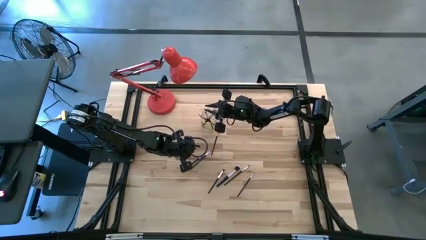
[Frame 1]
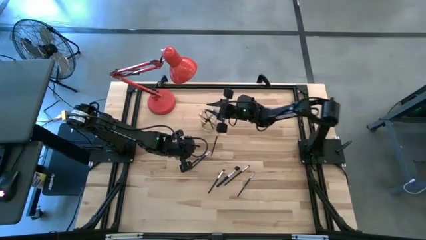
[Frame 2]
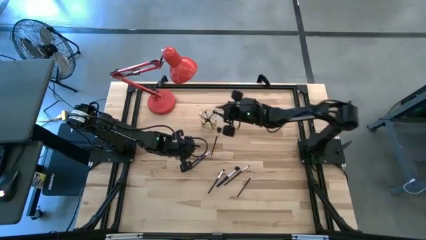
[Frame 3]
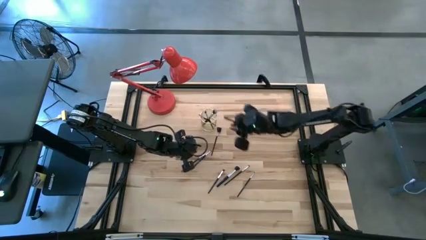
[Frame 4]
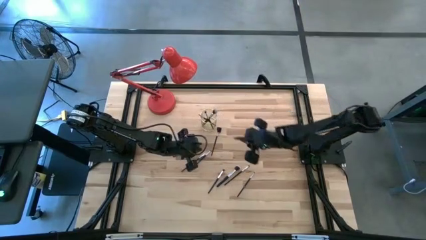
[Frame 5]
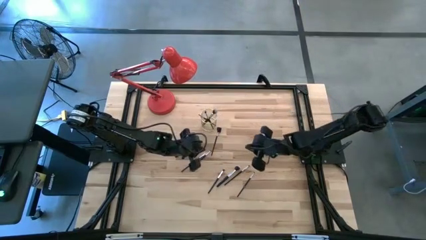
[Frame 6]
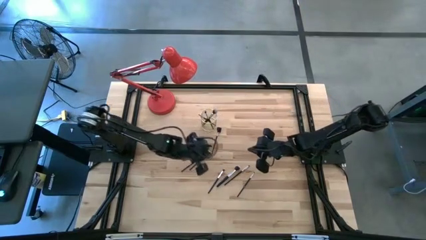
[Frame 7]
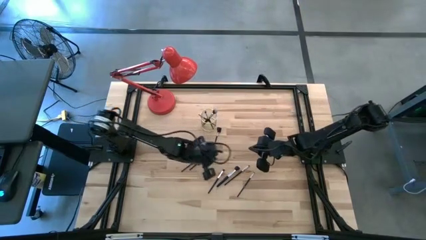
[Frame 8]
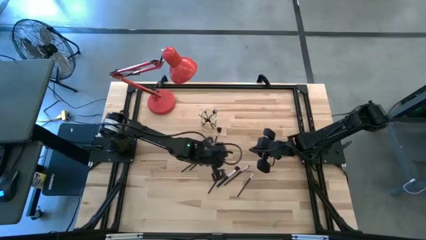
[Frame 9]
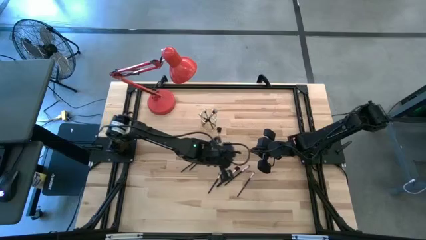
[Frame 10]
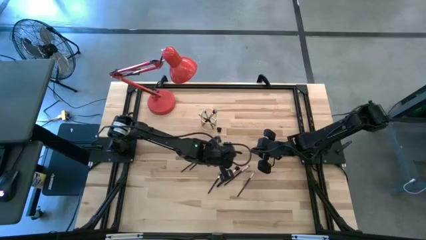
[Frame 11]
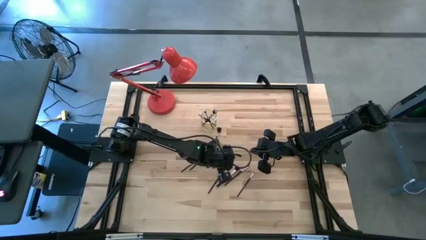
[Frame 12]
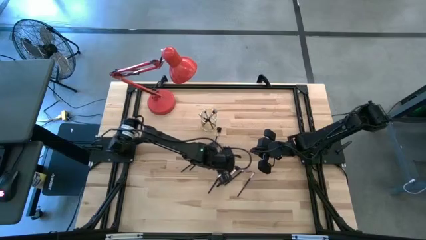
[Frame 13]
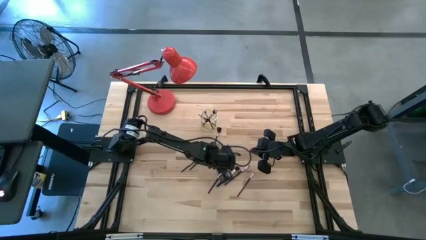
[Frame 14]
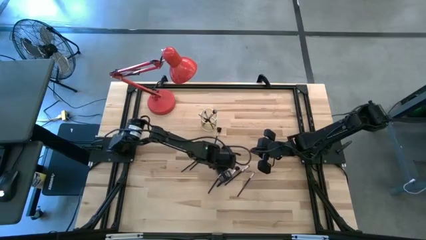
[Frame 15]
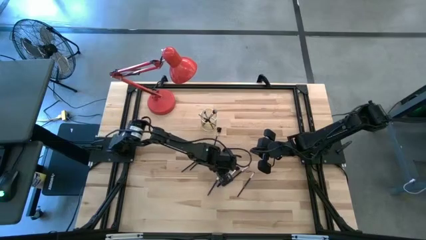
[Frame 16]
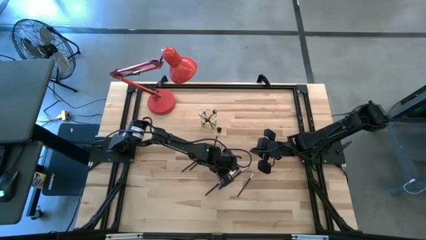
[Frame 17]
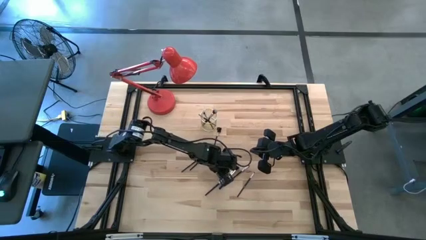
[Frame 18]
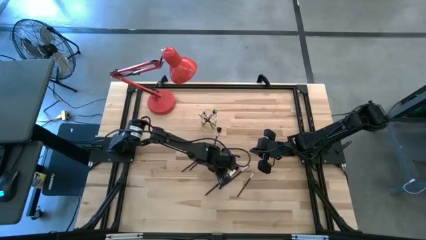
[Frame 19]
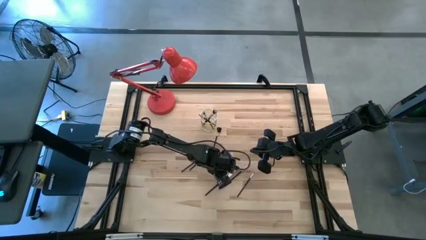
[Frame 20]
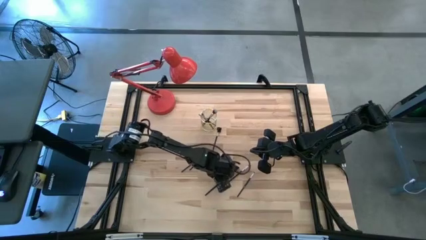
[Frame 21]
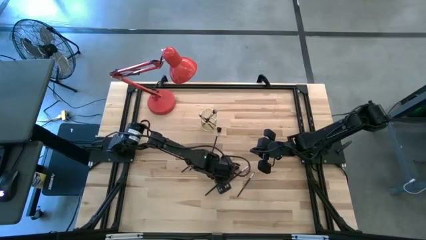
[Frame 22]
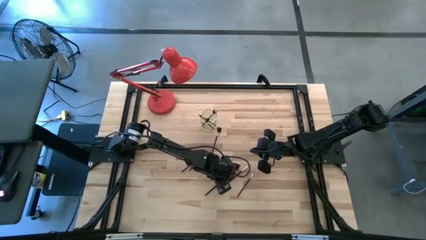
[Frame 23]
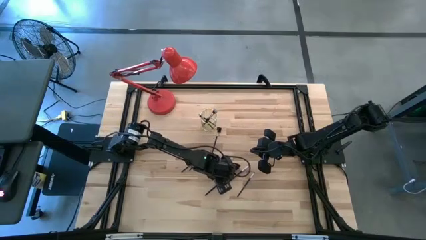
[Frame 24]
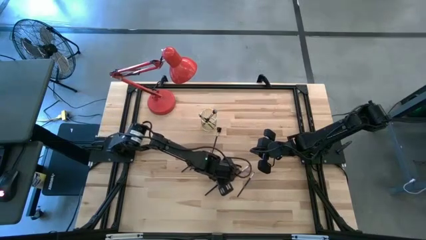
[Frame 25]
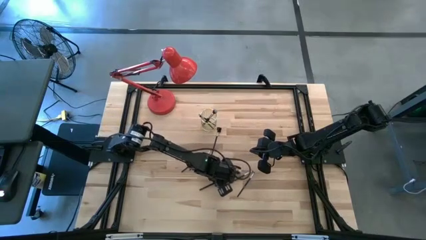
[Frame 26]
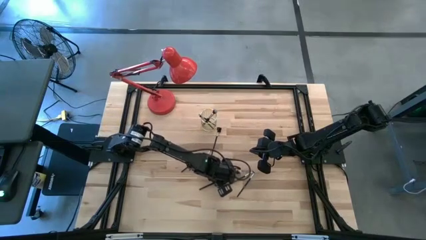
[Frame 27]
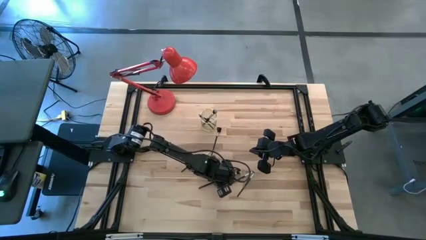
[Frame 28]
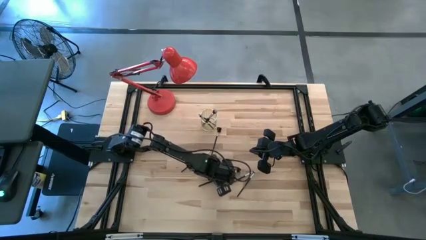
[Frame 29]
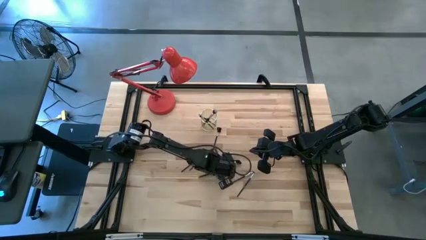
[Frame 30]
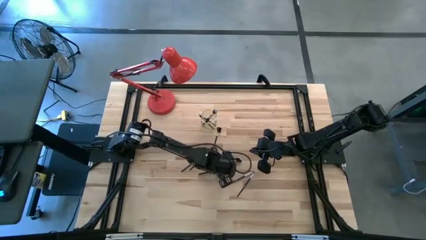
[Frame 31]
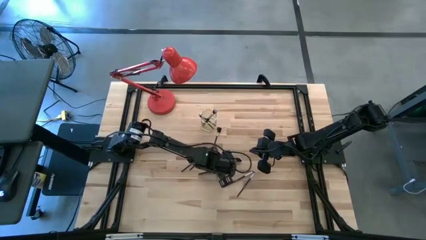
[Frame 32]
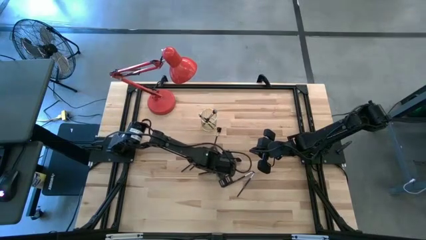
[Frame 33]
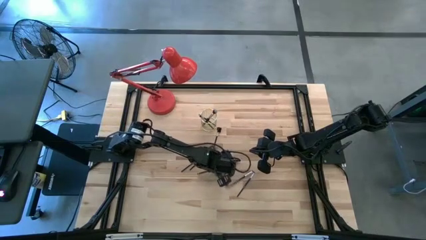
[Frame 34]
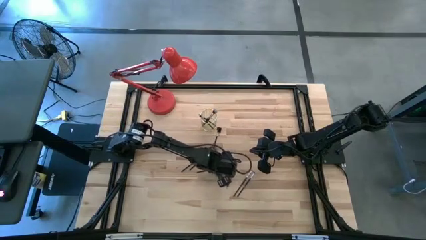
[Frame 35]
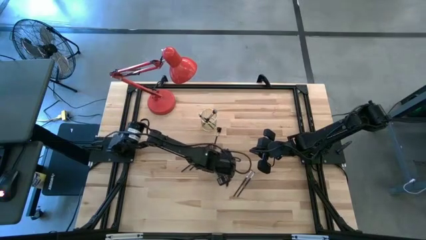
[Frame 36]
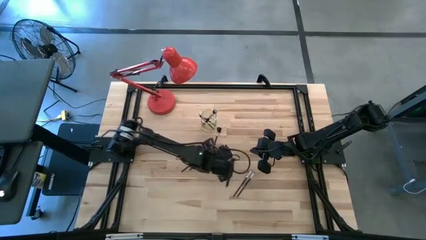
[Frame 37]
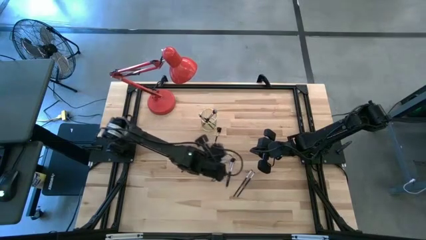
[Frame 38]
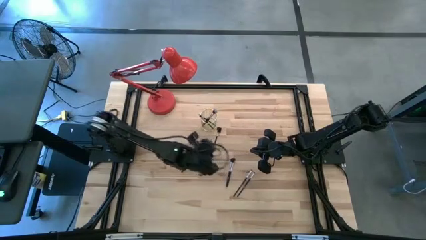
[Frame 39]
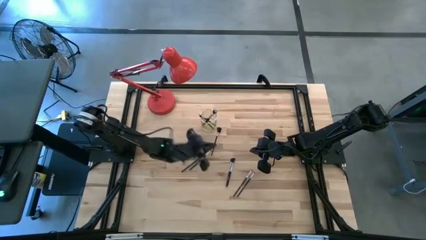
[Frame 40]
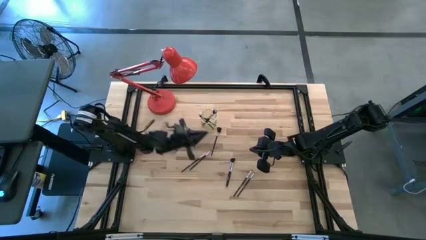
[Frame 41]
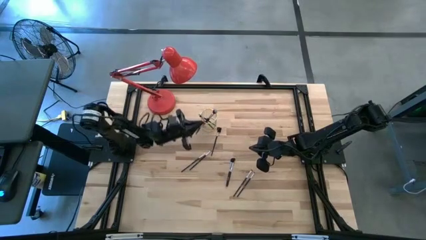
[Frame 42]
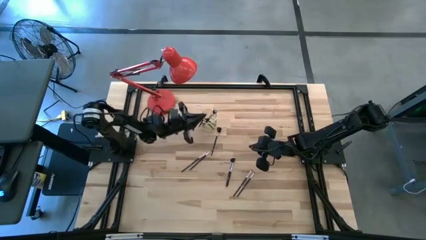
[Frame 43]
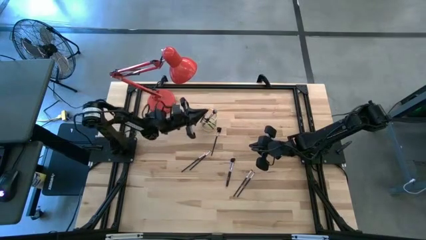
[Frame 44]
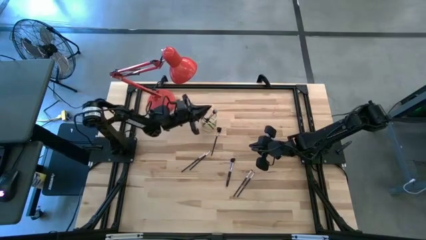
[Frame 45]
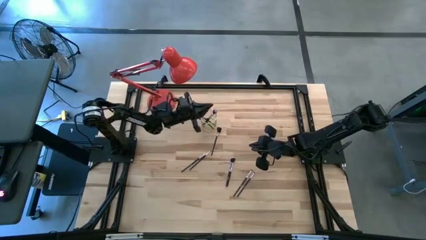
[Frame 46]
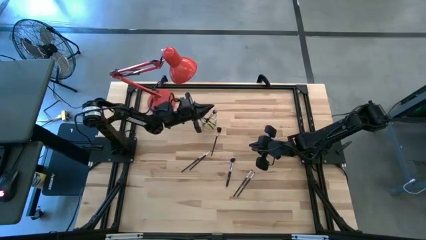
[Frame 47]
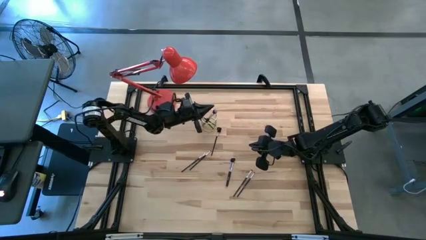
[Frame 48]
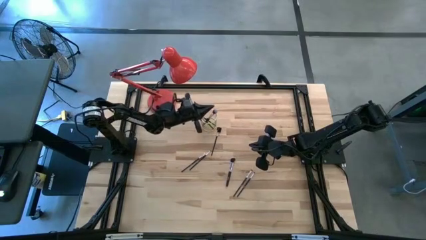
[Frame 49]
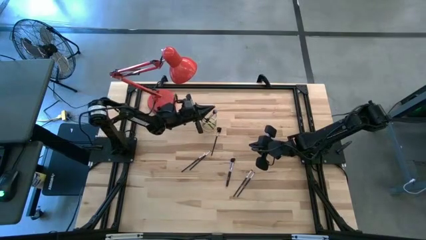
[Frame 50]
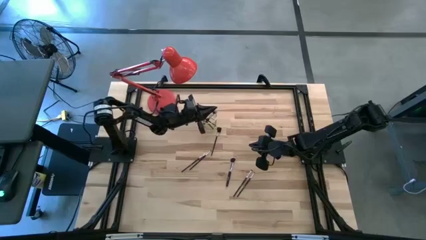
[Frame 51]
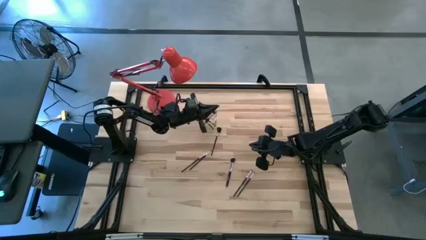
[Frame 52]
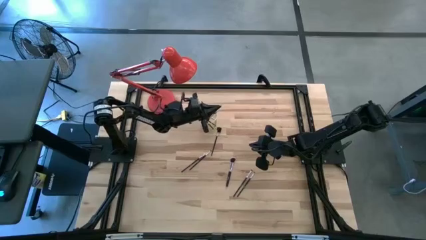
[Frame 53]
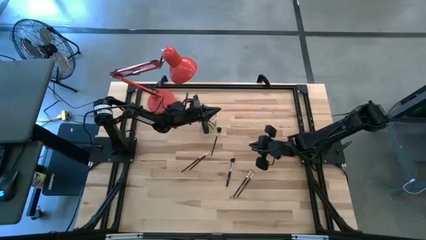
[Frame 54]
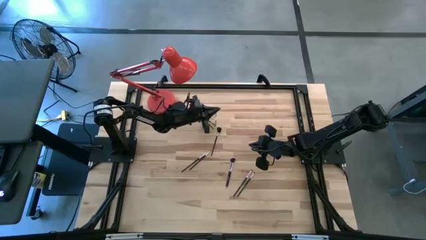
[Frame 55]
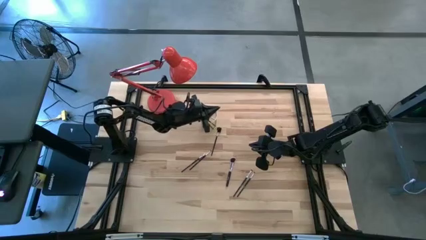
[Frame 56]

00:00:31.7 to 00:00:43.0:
Task: Put items in baskets/containers
Put the black foundation brush into the gold pen holder

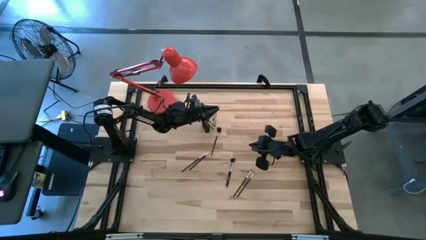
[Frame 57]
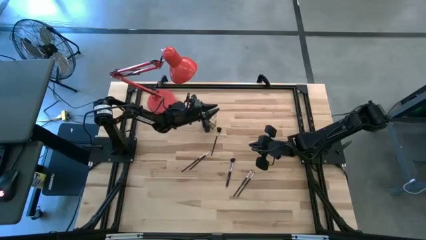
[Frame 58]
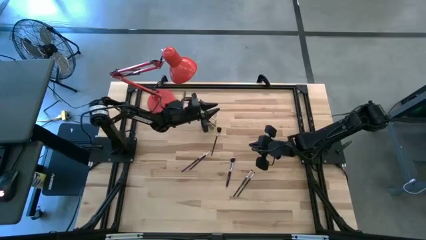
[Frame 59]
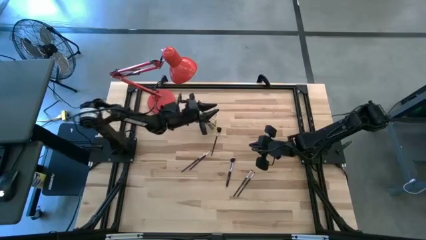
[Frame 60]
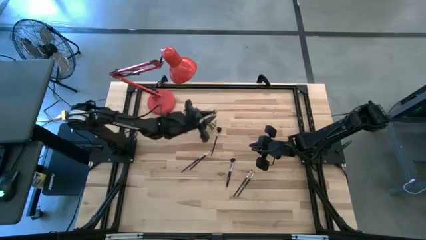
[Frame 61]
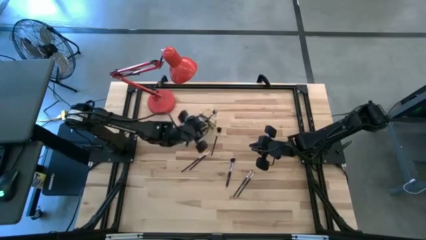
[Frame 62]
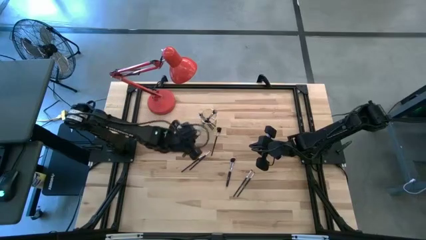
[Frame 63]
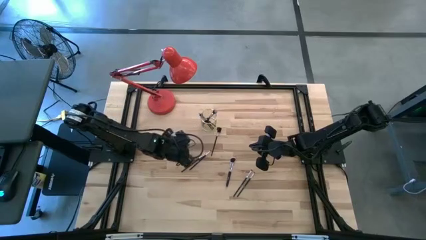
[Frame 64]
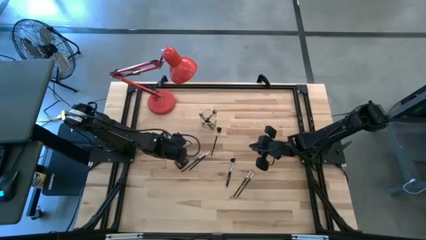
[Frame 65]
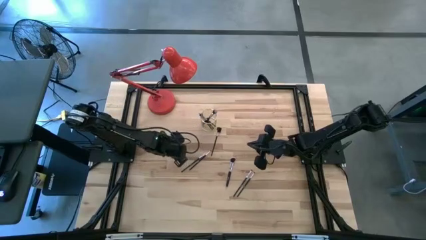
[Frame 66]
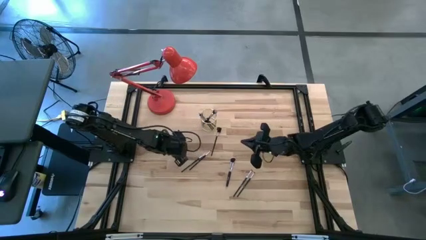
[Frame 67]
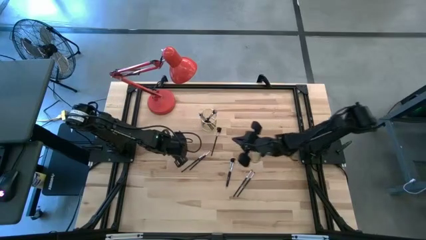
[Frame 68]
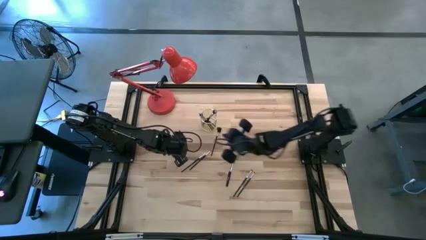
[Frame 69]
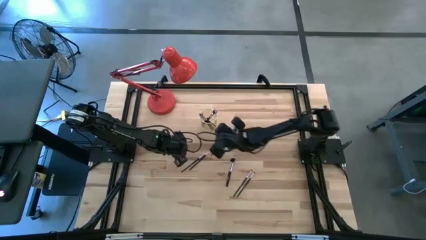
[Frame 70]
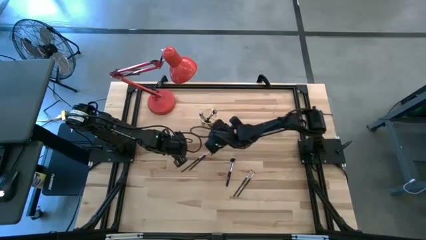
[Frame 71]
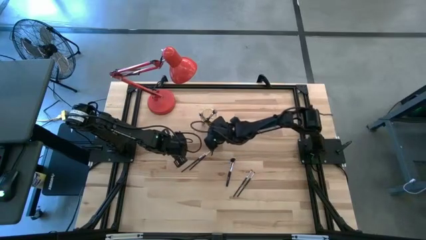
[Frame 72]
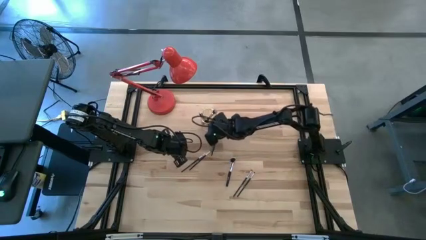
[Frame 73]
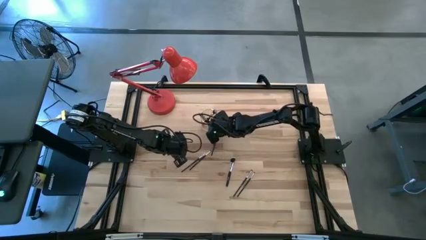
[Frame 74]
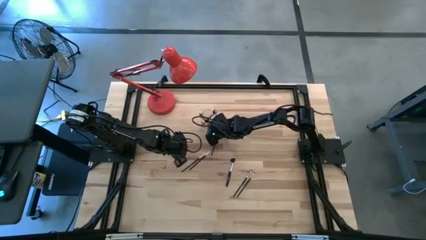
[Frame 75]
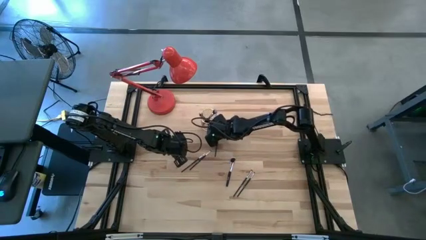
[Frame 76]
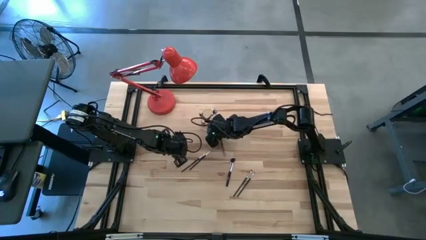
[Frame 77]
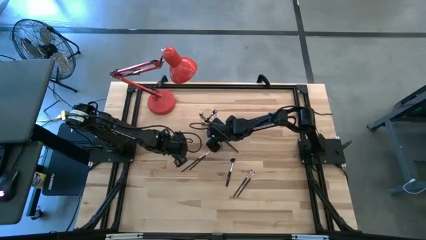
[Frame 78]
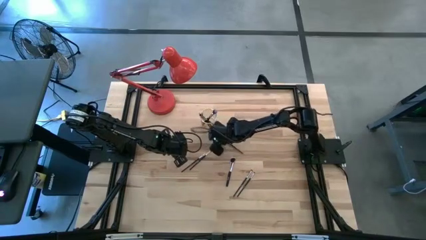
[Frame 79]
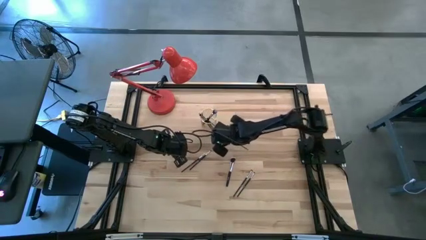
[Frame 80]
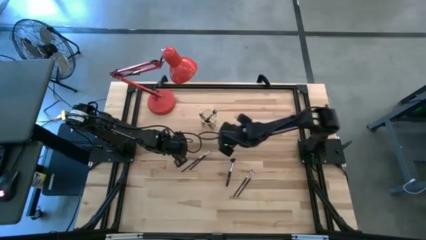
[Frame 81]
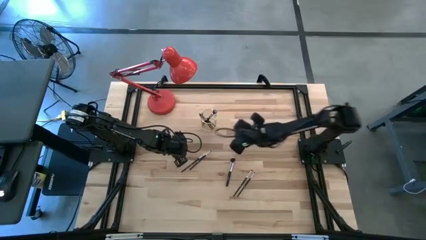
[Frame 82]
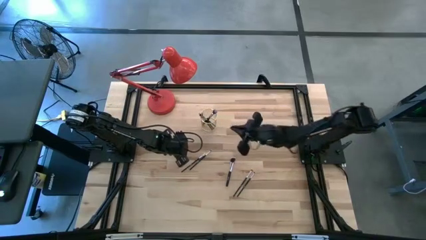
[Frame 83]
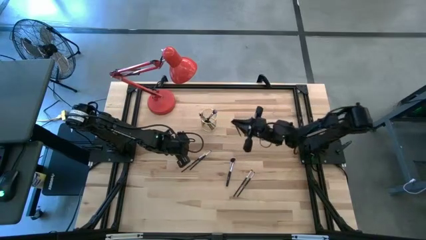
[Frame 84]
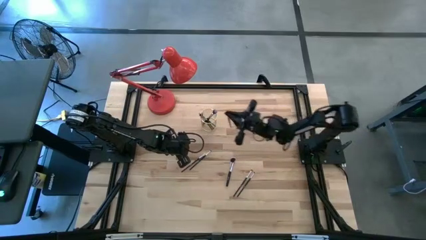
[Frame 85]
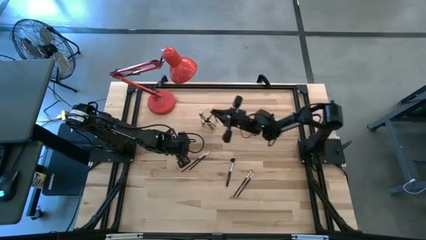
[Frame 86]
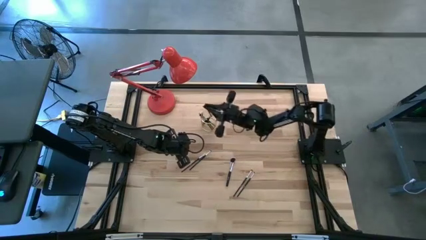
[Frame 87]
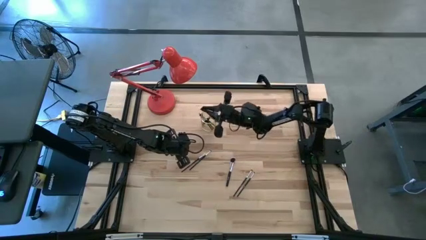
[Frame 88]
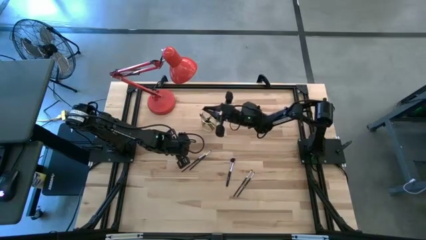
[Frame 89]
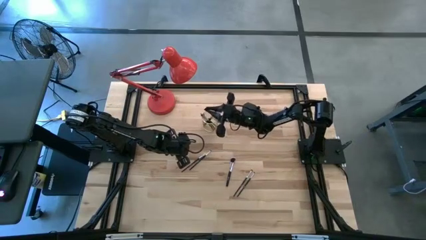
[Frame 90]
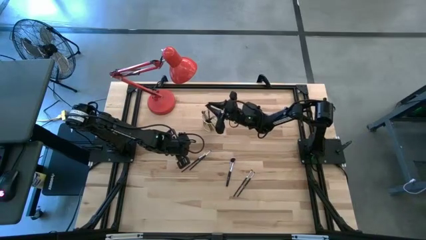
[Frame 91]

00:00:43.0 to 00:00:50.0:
Put the black brow brush into the gold pen holder
